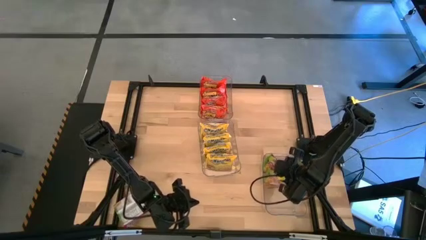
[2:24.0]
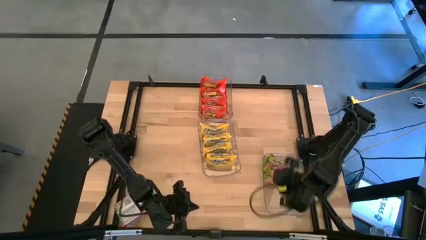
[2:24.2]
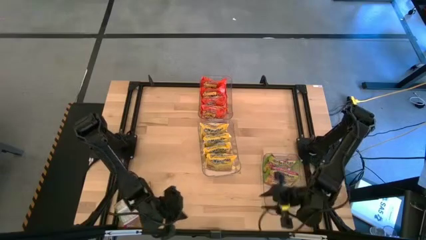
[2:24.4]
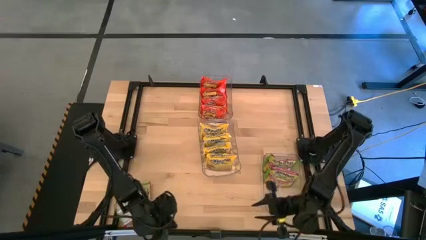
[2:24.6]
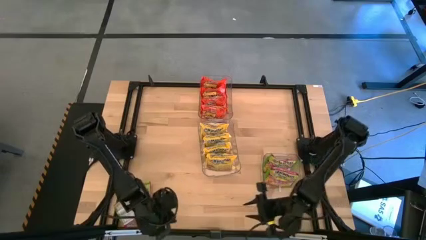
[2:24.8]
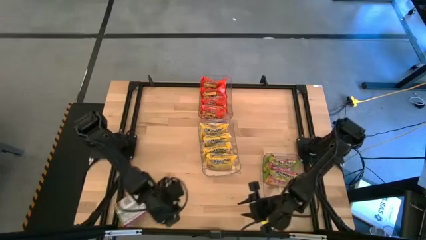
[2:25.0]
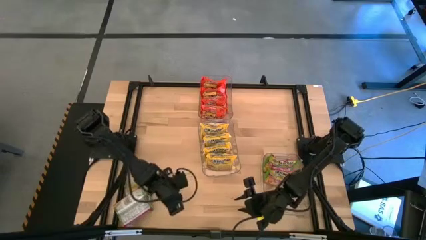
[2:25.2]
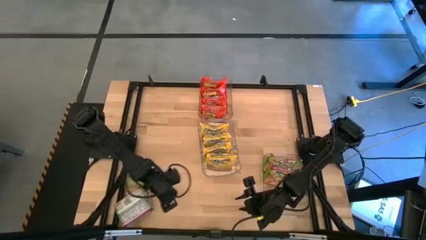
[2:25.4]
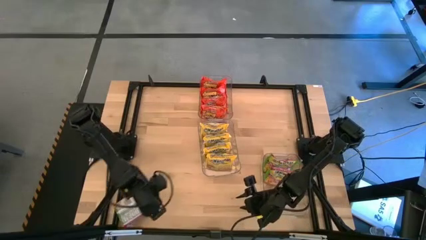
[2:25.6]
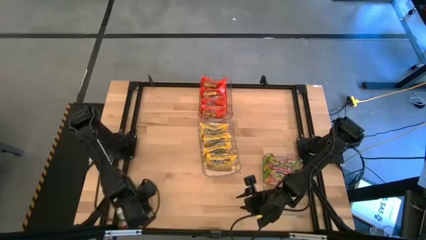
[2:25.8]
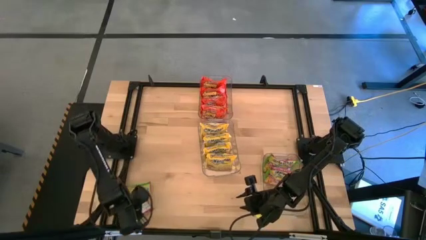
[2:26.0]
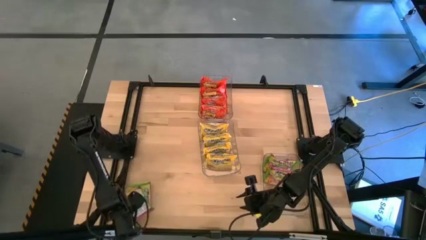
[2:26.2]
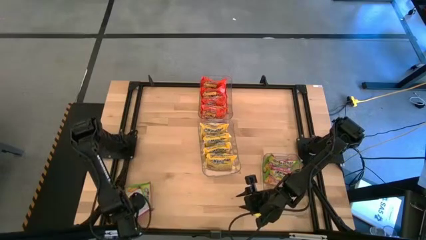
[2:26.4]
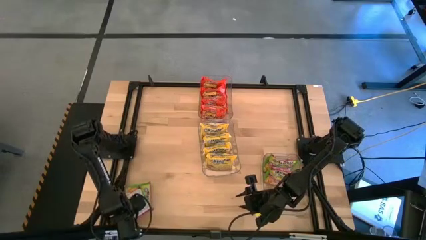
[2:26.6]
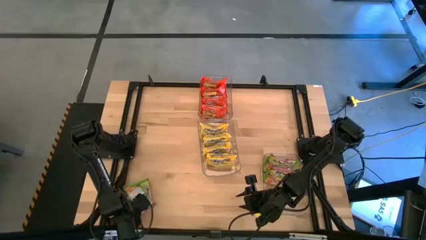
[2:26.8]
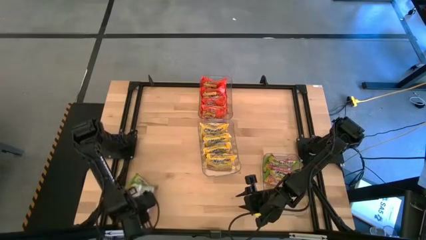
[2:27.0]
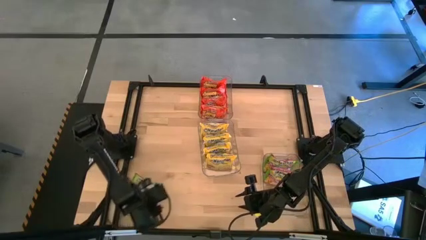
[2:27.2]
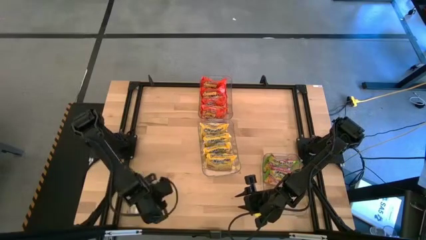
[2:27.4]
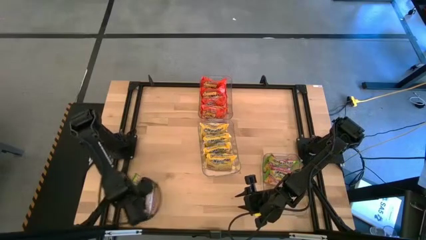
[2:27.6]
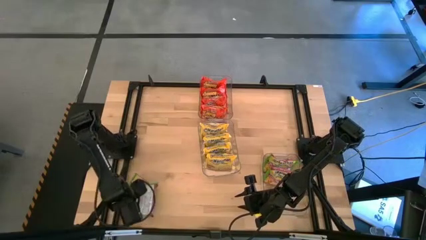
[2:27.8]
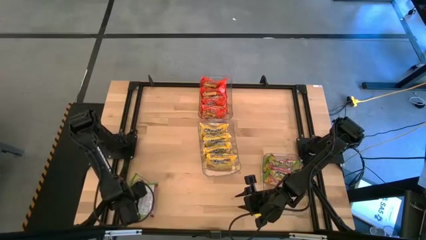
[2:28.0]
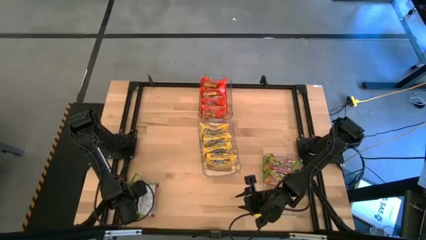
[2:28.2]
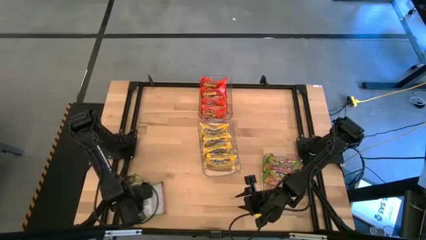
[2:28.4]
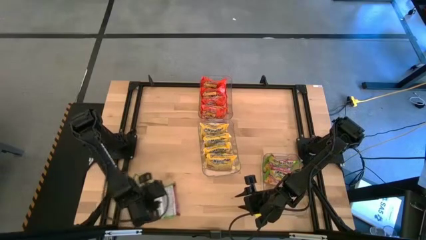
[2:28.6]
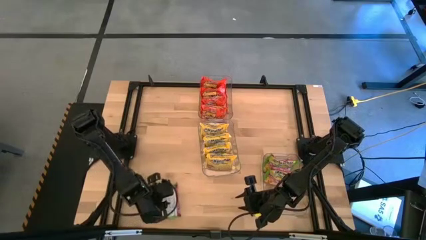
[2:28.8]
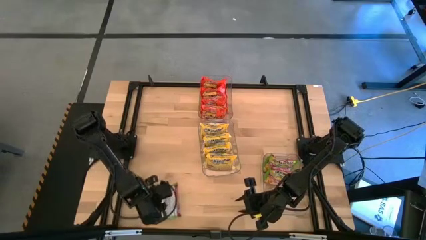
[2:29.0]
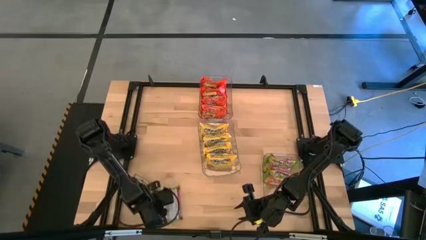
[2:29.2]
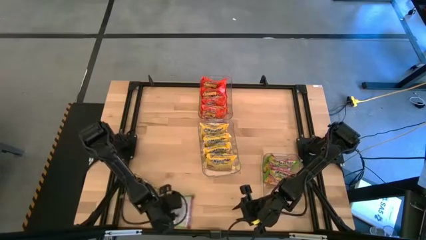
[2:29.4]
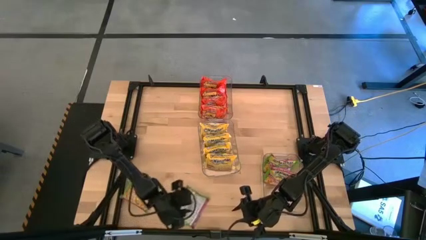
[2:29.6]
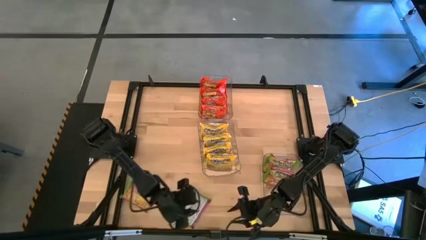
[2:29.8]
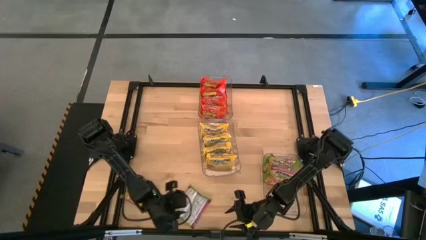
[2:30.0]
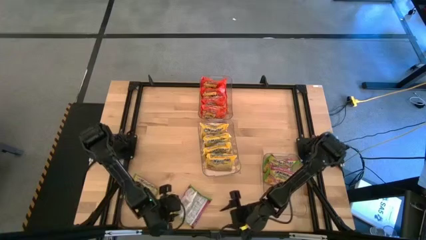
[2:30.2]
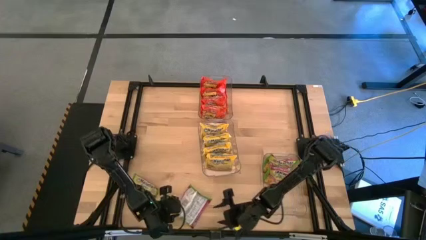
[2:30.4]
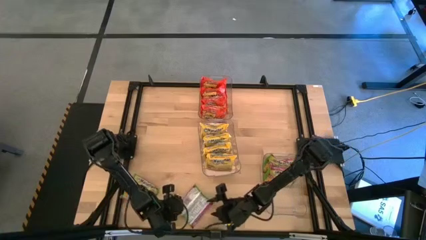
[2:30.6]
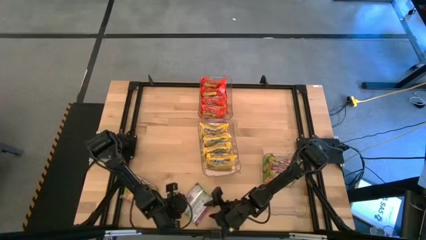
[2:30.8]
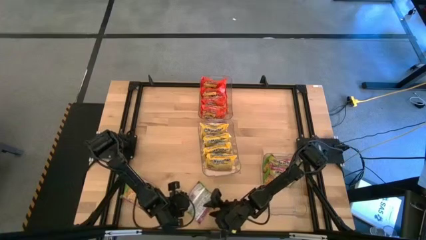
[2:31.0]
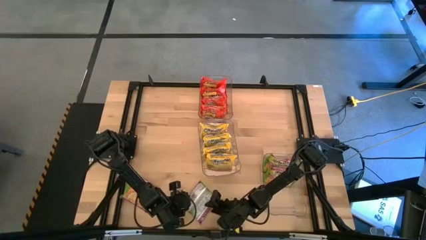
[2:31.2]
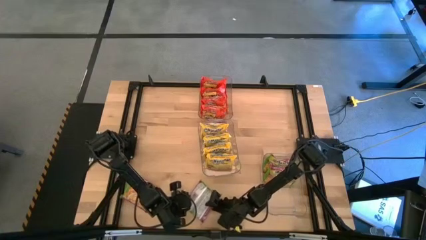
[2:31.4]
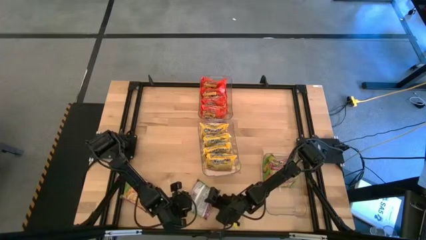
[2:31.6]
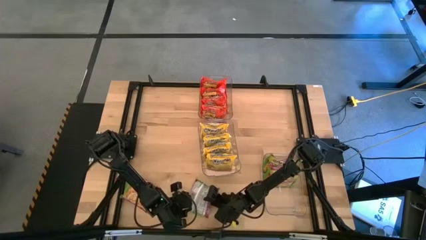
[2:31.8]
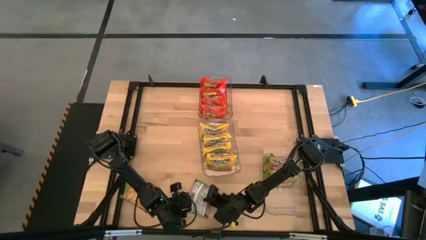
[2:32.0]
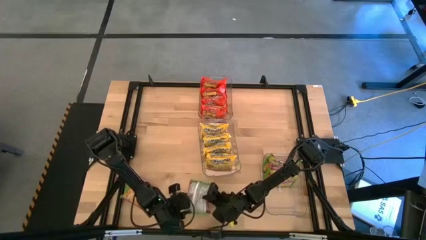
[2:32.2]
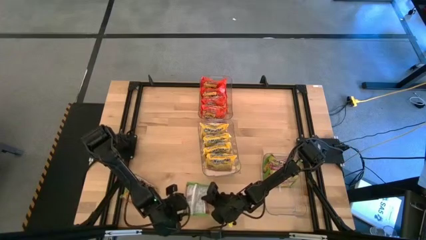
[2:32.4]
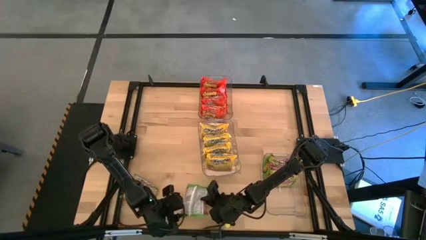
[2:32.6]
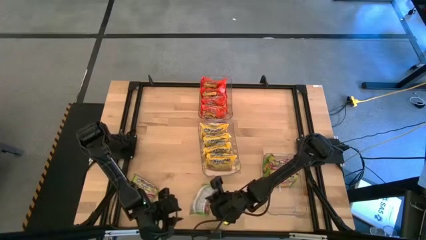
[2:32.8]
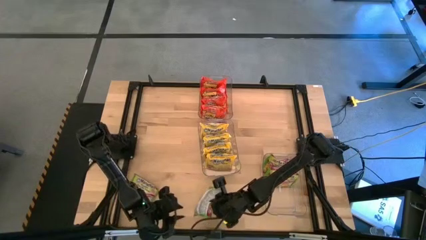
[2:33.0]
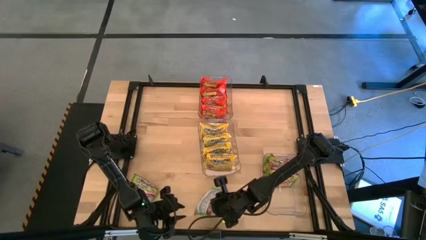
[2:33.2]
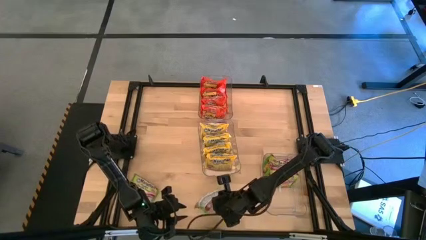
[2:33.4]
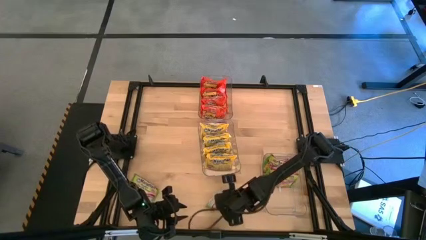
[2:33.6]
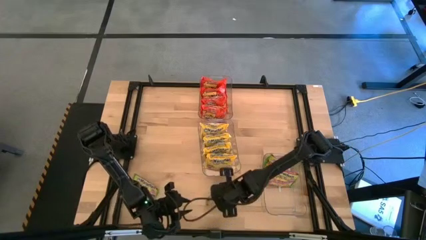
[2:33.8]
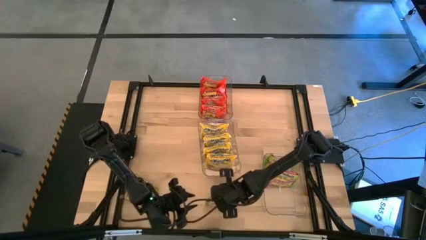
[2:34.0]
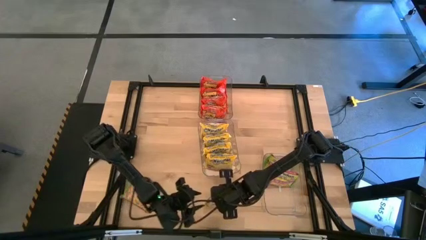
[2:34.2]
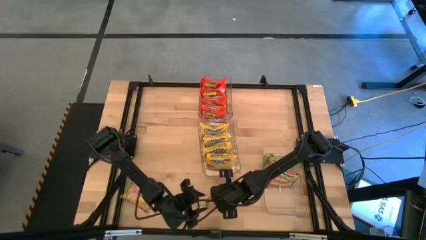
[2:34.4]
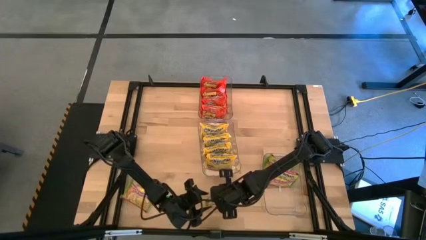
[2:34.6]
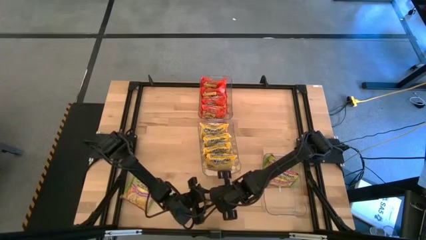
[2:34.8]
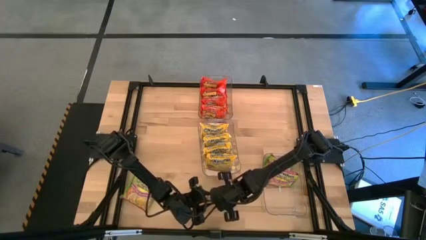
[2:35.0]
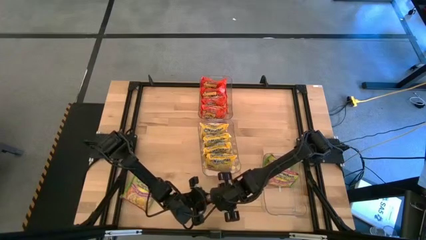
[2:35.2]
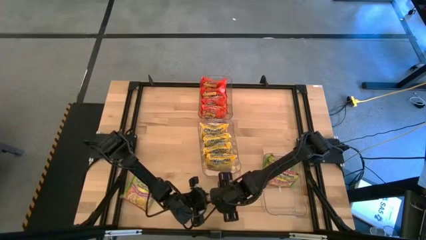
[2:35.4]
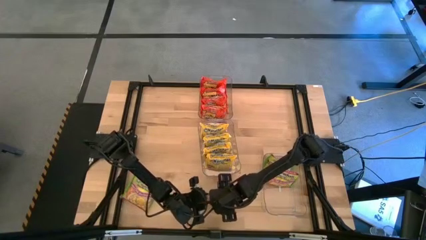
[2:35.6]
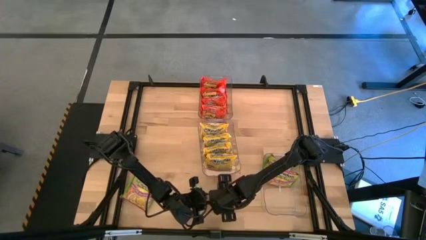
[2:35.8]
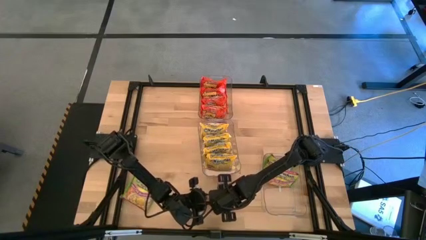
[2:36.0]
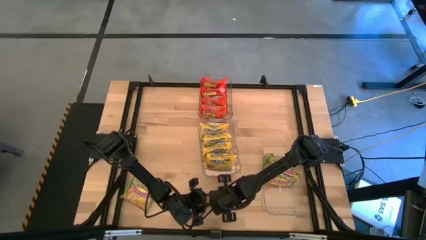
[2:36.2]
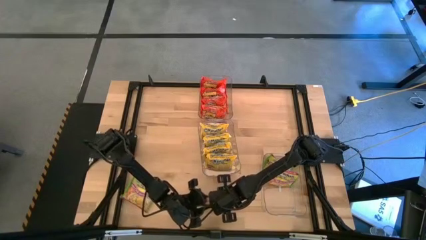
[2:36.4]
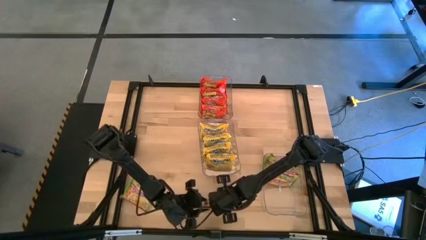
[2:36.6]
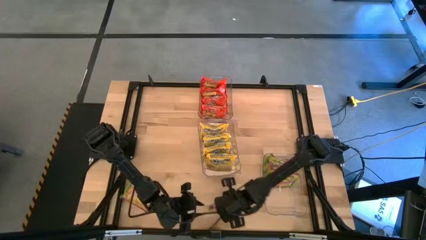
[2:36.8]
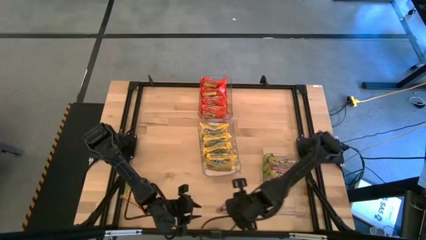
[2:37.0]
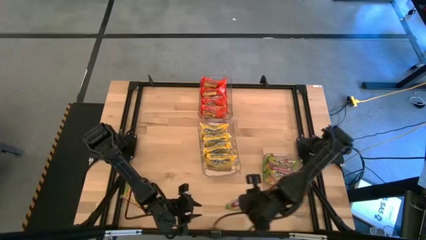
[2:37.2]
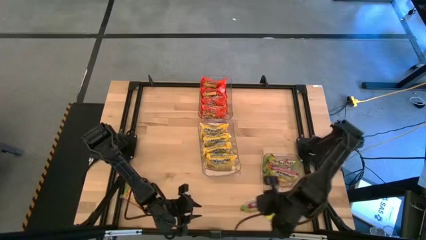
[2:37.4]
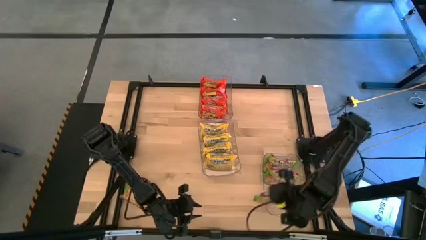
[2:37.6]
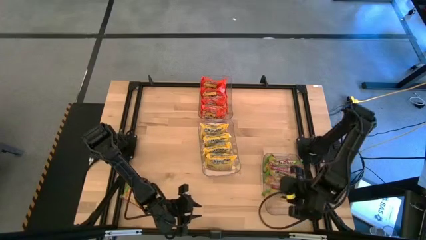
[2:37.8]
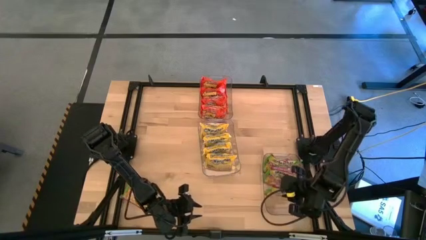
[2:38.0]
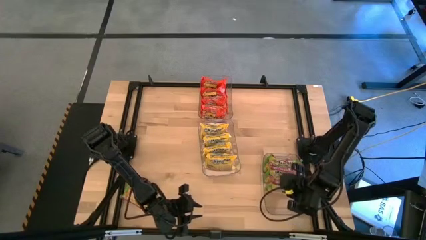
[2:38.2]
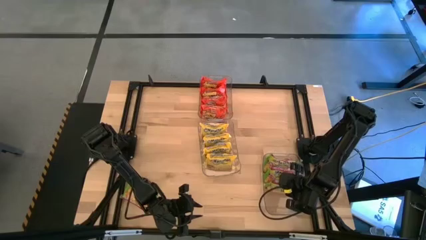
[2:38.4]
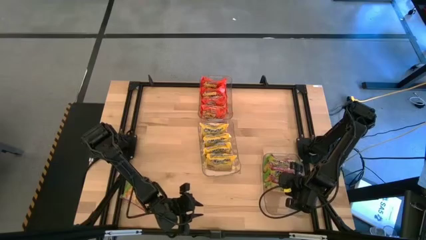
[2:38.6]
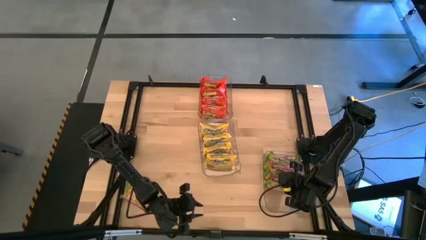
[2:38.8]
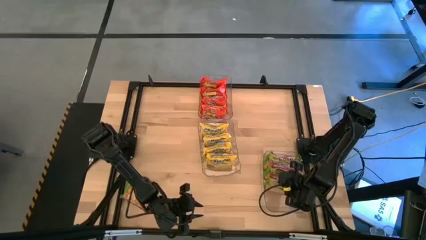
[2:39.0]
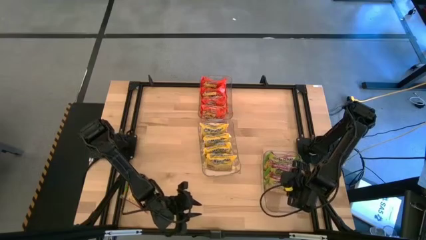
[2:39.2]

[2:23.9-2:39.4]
Task: Sort Maruchan noodles
Put the green noodle pack into the bottom transparent bin
